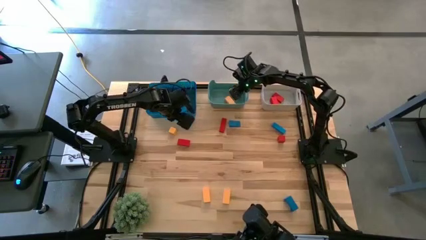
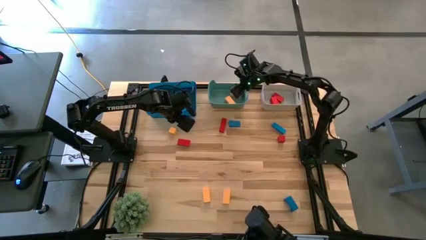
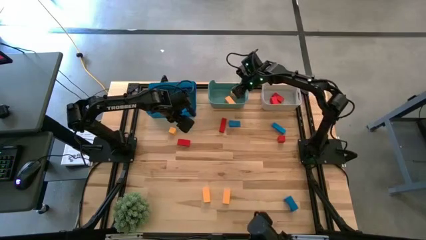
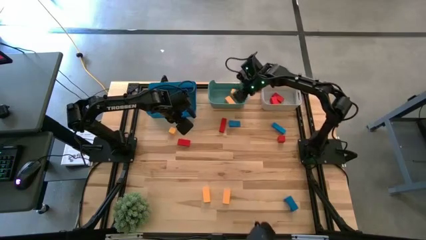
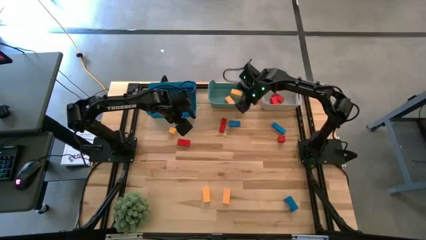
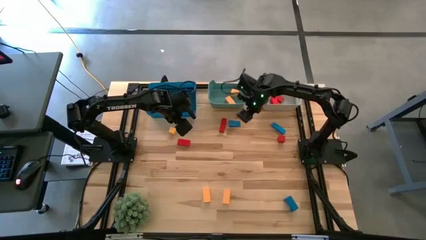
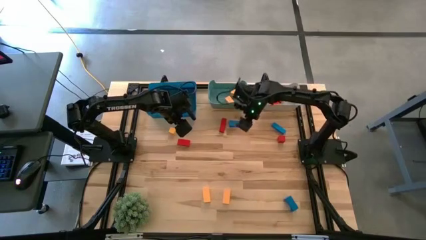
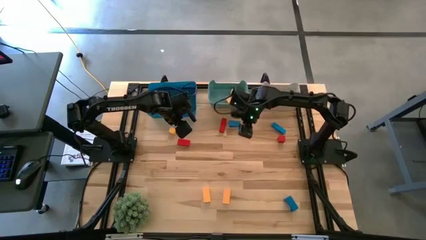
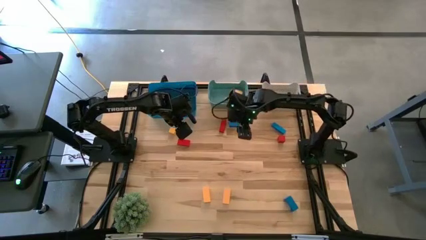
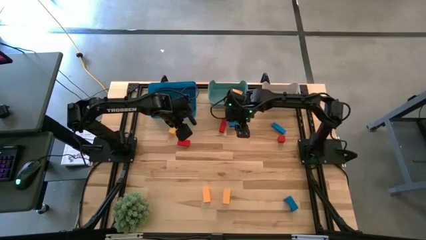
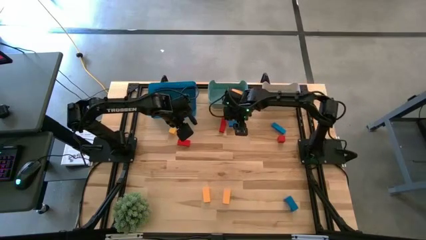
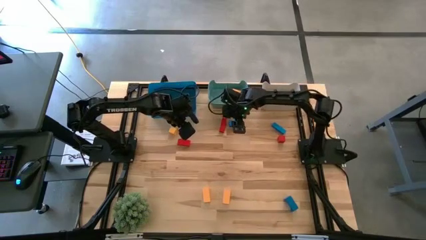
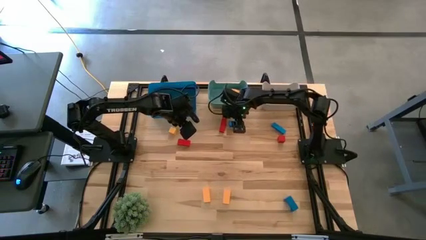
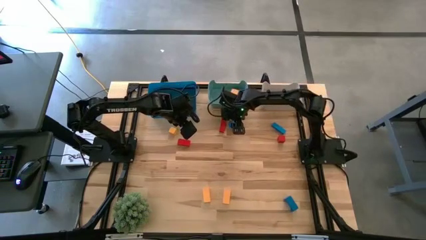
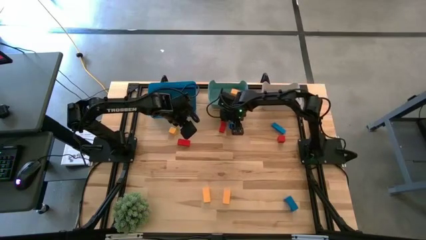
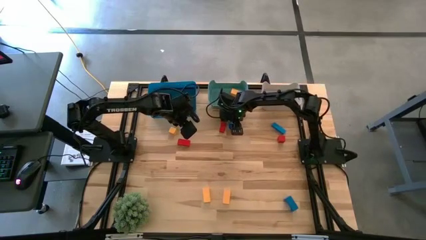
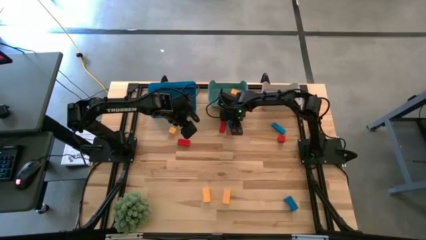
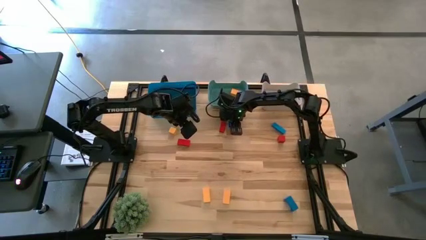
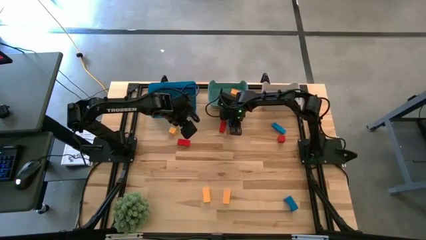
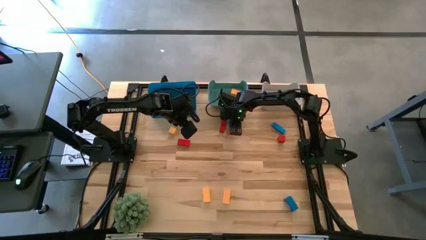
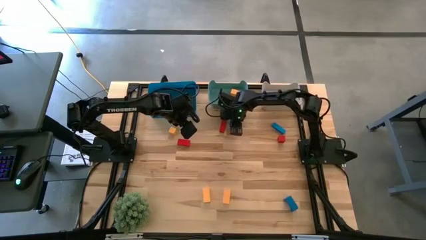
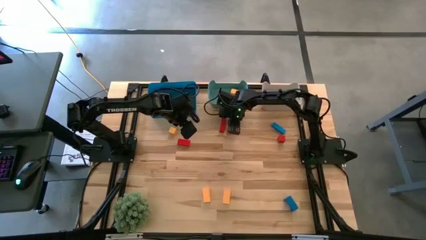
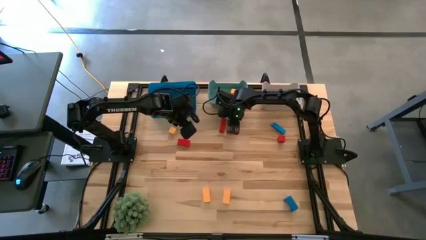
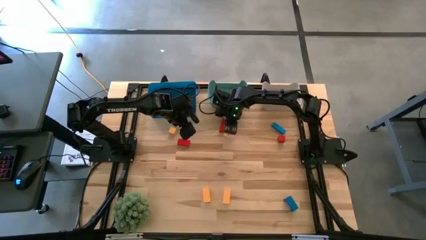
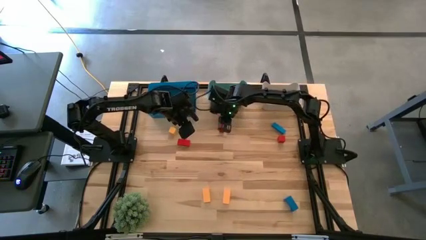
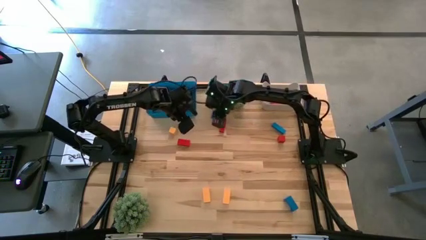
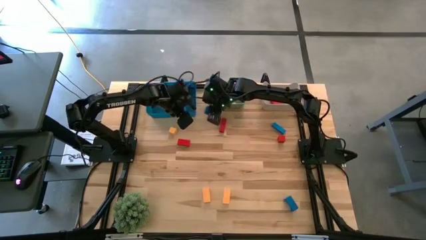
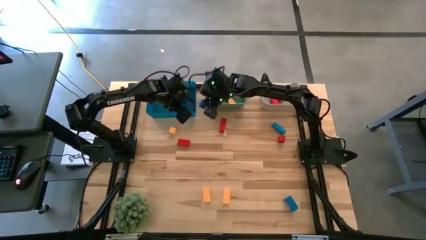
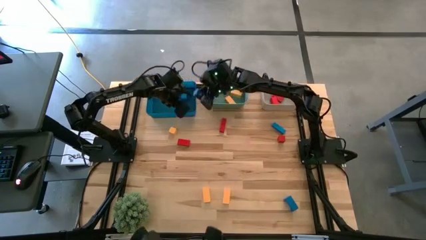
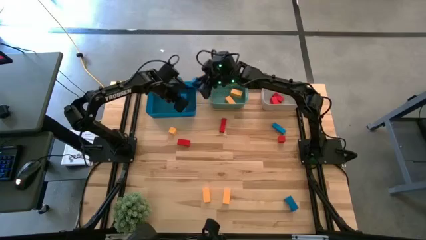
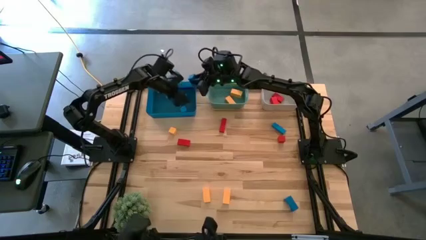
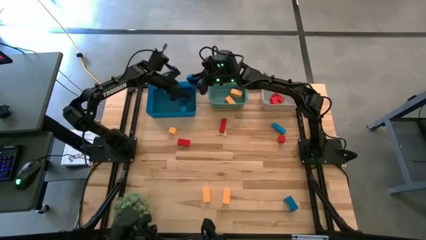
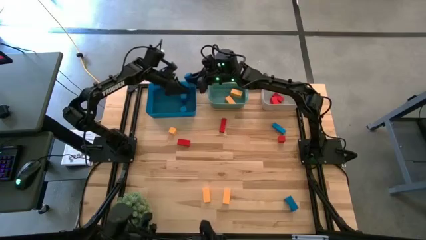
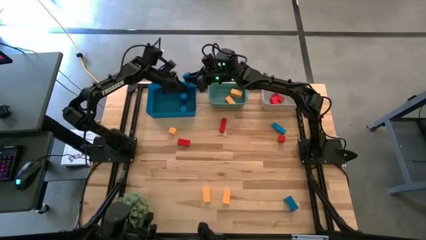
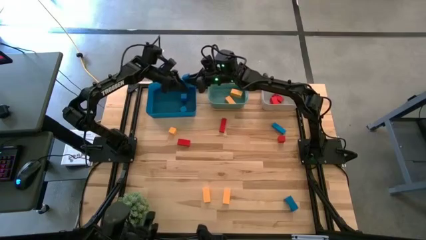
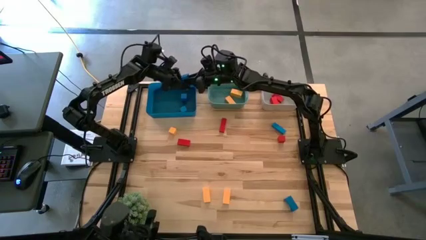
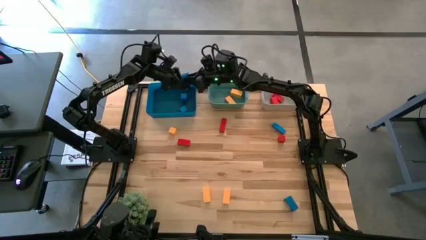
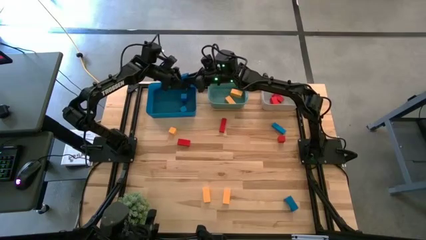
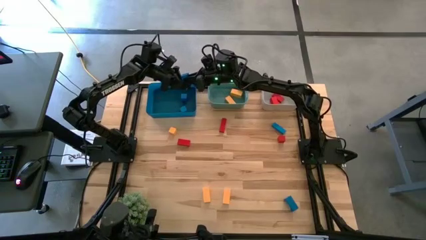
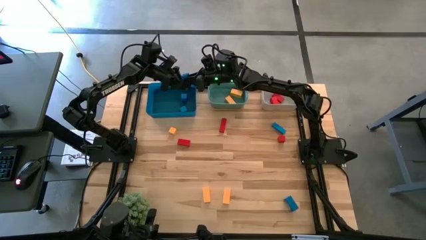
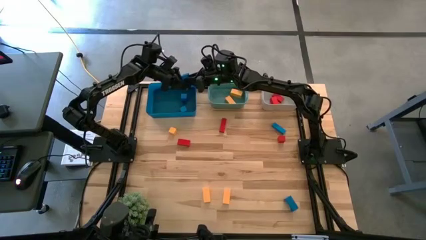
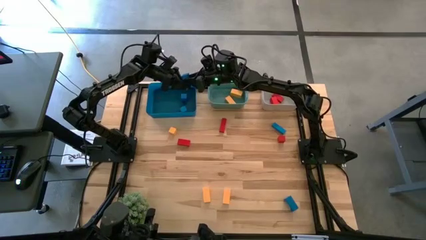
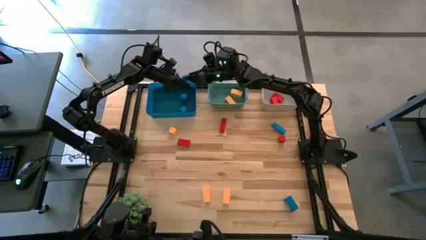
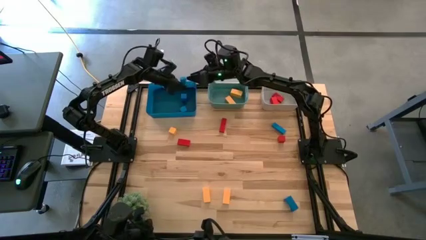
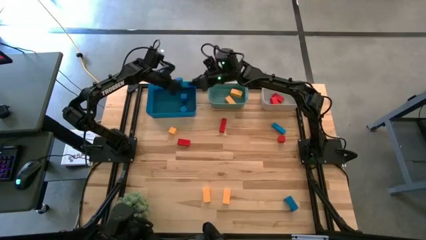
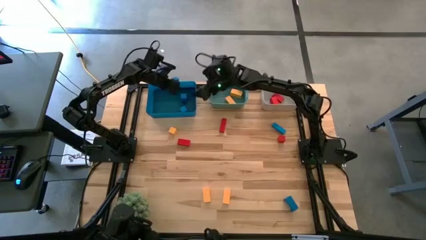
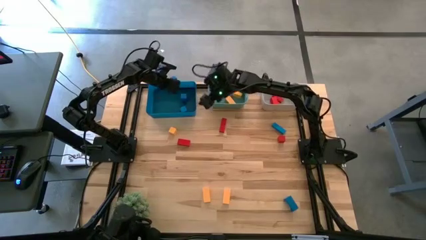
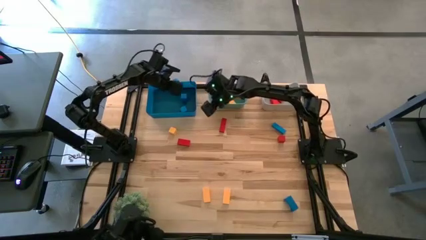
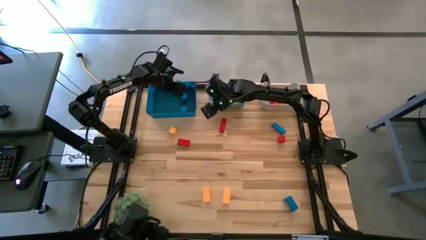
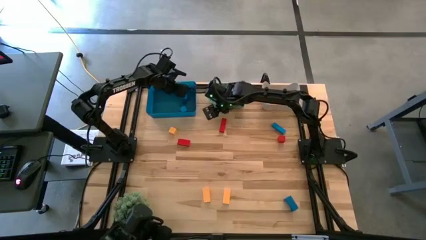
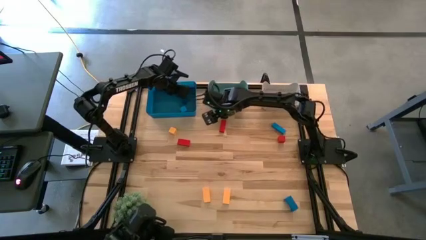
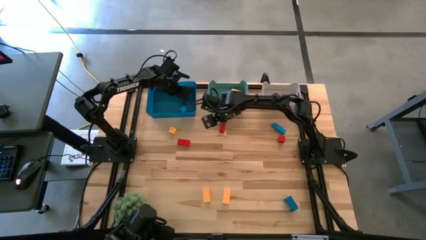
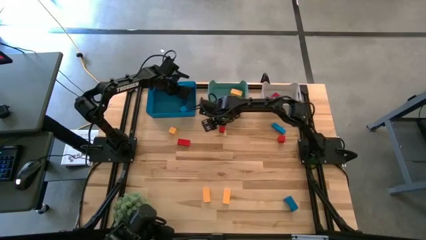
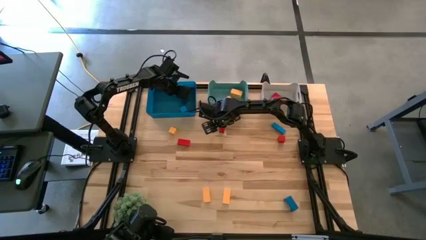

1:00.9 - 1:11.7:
Task: Sort & place blocks by color
Put the blue block into the blue bin

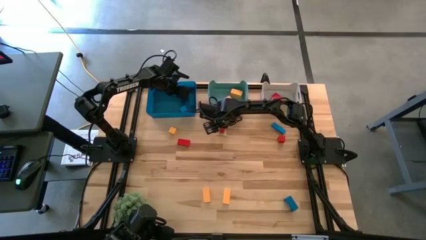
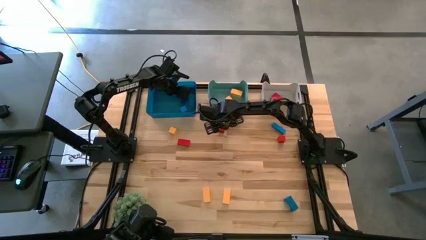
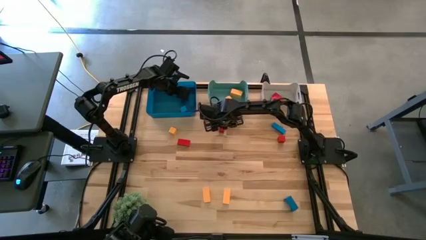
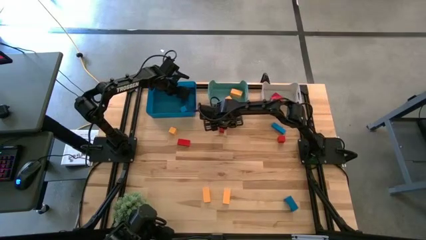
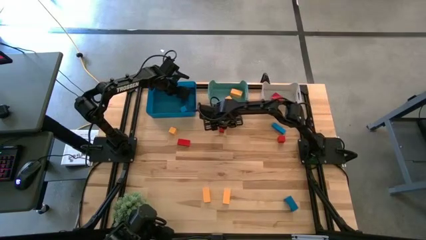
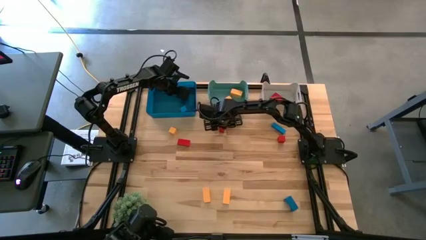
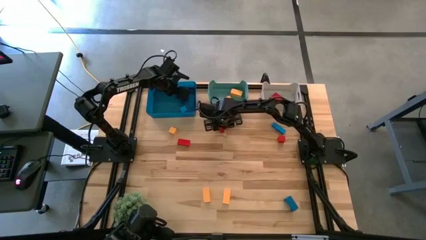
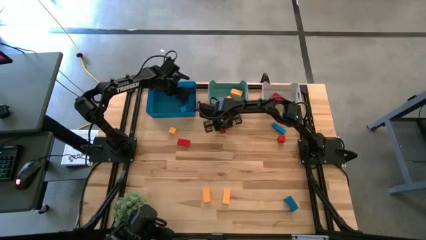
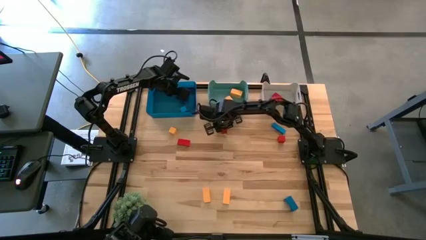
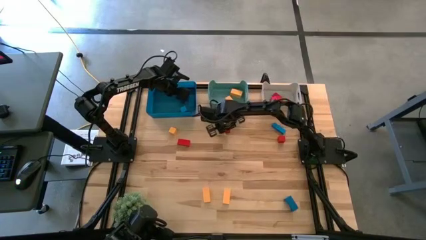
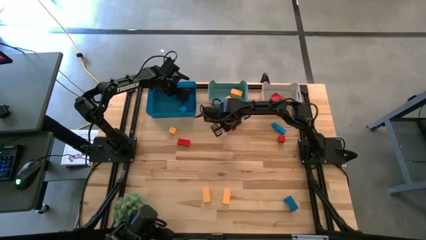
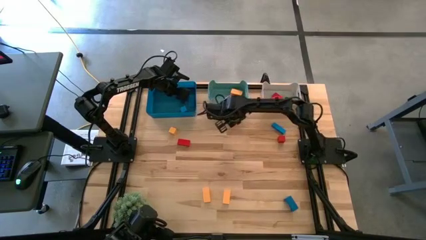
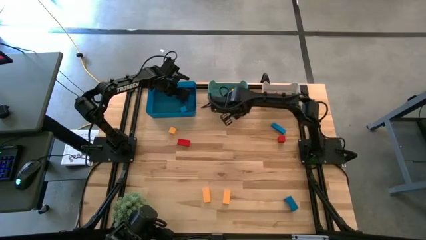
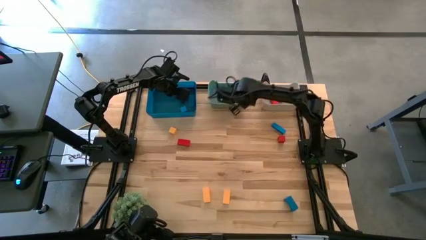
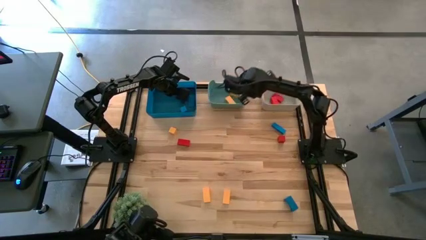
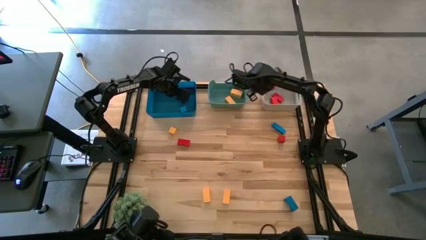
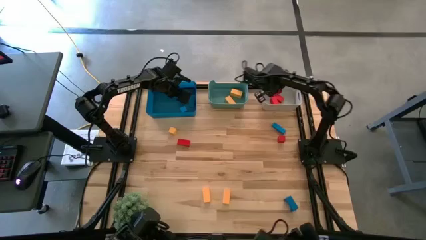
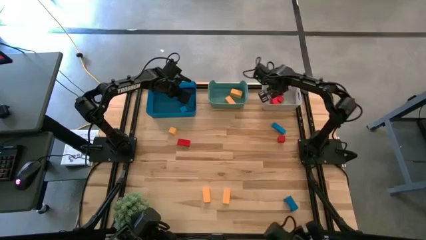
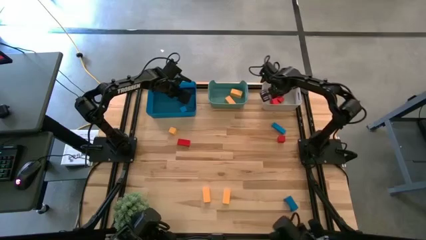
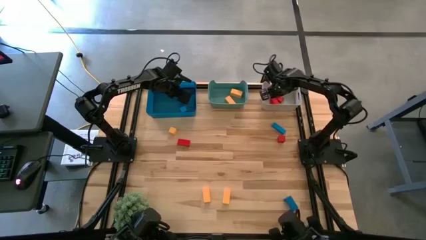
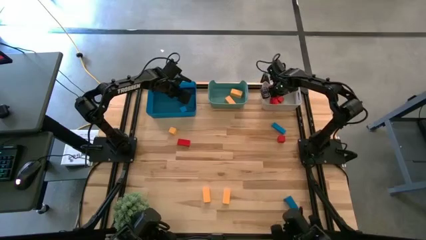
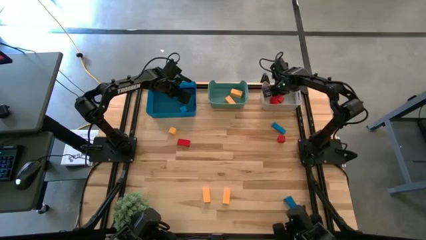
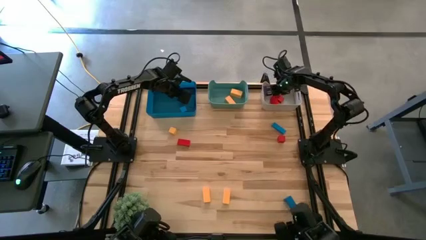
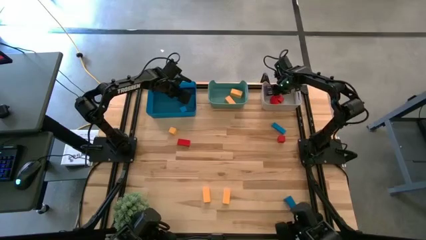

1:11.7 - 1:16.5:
Put the red block into the grey bin
